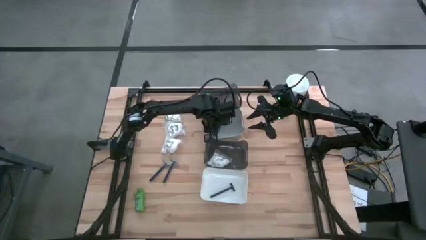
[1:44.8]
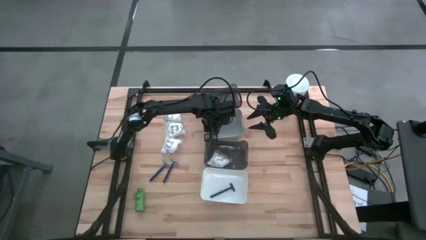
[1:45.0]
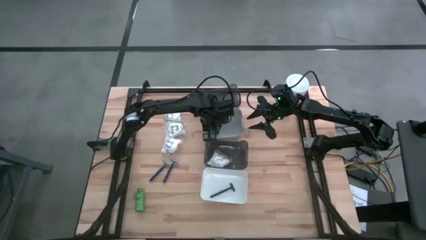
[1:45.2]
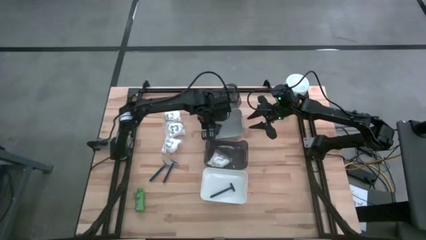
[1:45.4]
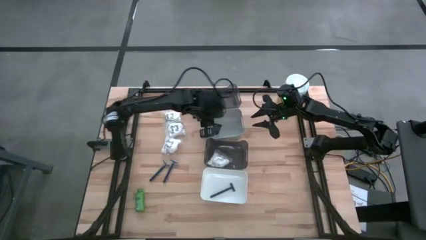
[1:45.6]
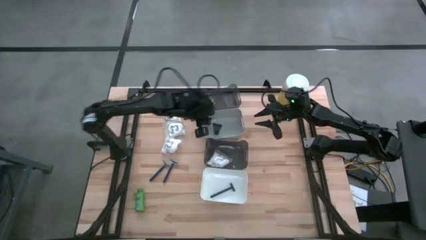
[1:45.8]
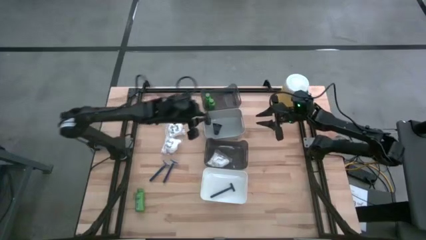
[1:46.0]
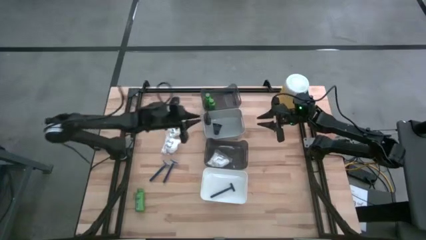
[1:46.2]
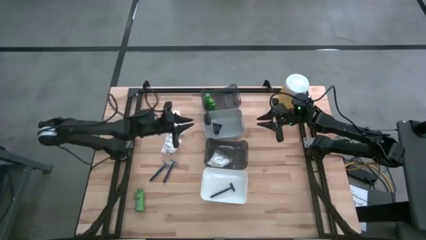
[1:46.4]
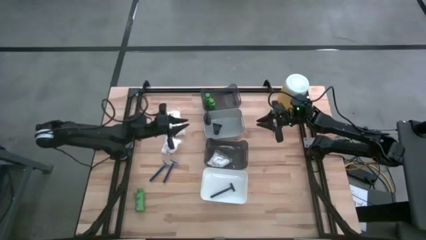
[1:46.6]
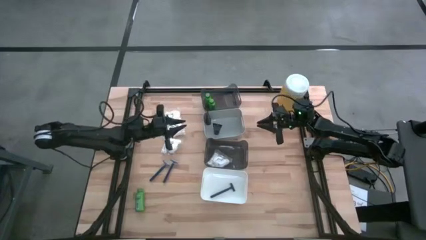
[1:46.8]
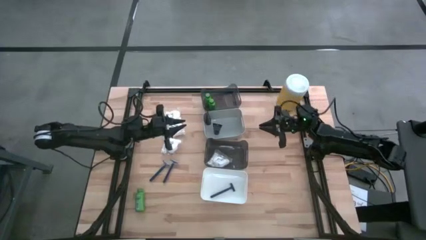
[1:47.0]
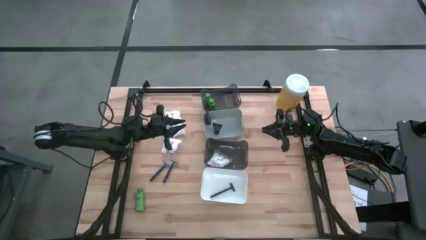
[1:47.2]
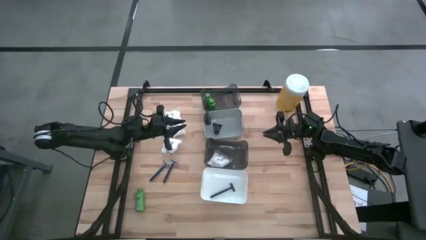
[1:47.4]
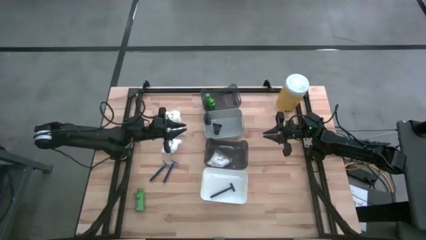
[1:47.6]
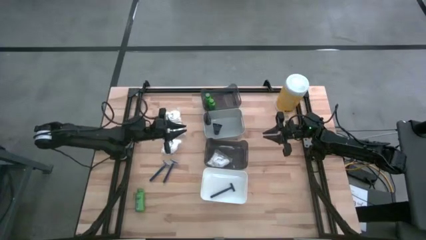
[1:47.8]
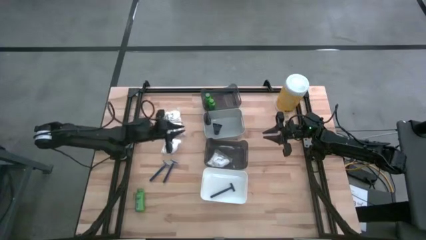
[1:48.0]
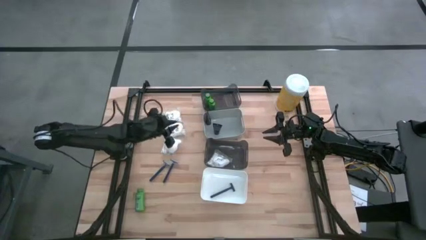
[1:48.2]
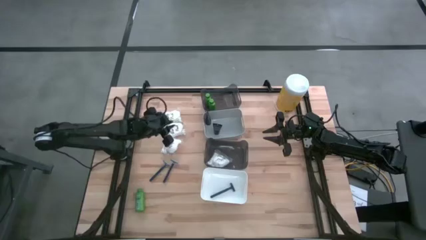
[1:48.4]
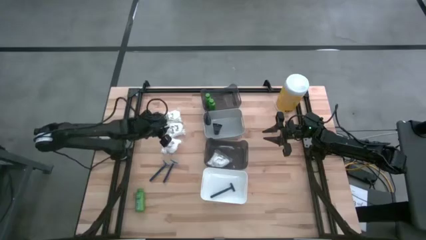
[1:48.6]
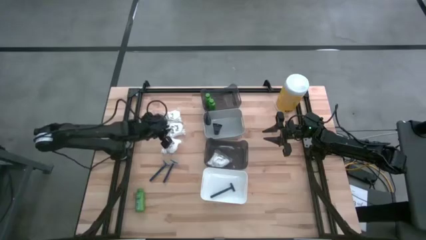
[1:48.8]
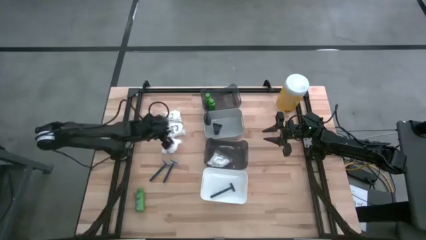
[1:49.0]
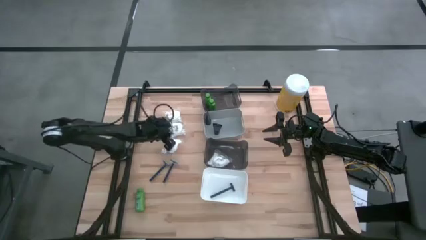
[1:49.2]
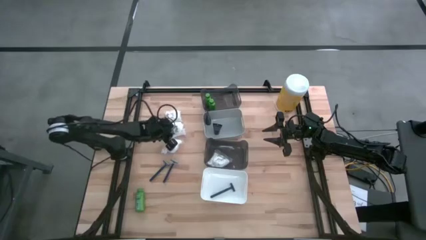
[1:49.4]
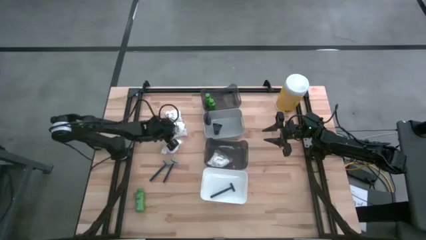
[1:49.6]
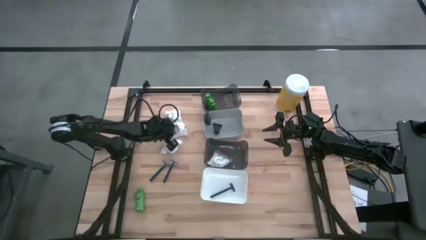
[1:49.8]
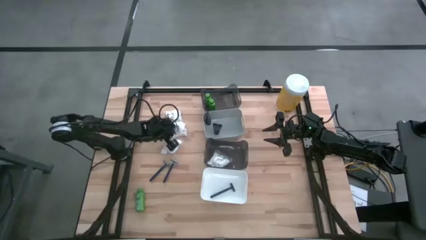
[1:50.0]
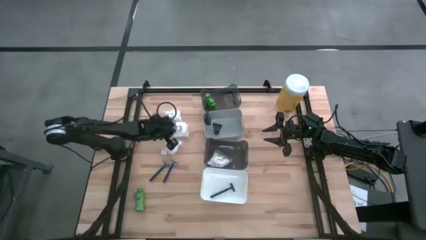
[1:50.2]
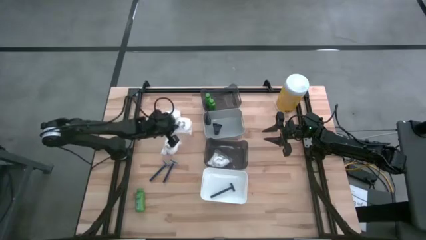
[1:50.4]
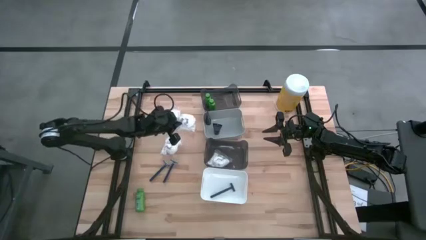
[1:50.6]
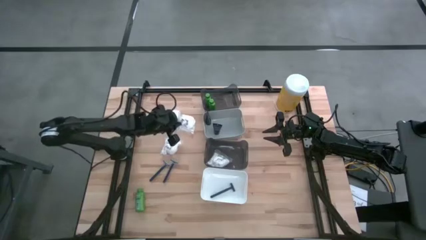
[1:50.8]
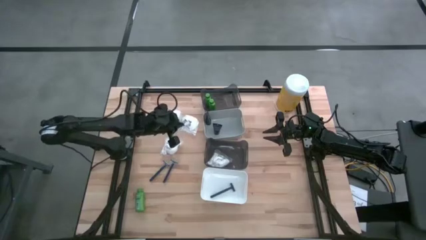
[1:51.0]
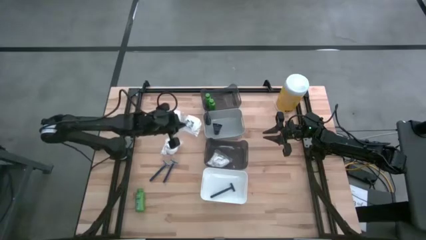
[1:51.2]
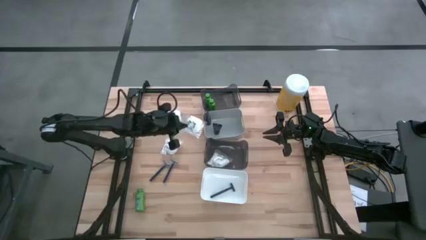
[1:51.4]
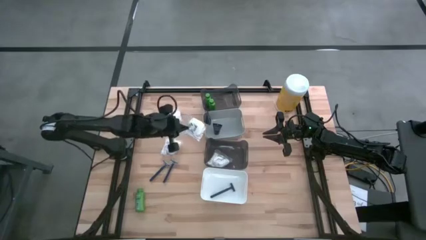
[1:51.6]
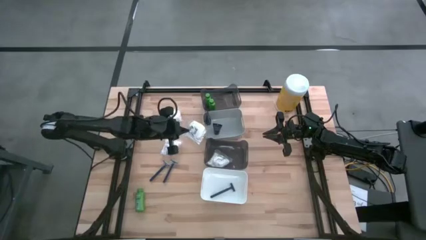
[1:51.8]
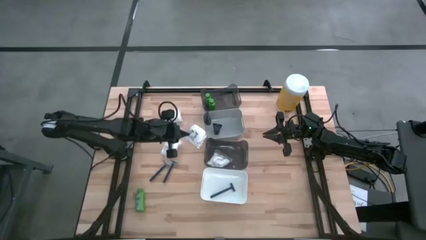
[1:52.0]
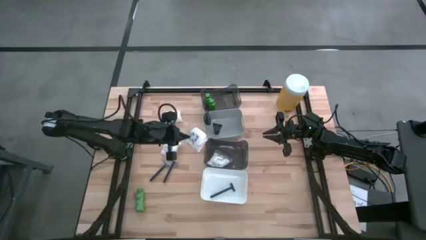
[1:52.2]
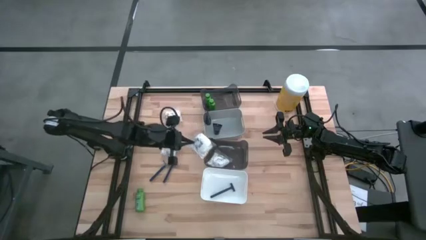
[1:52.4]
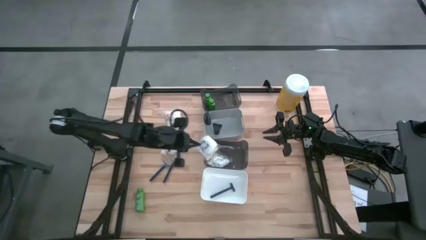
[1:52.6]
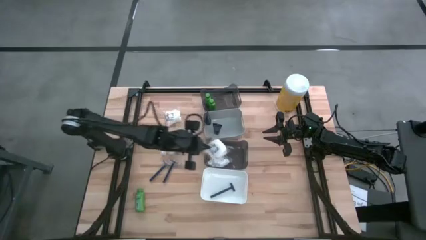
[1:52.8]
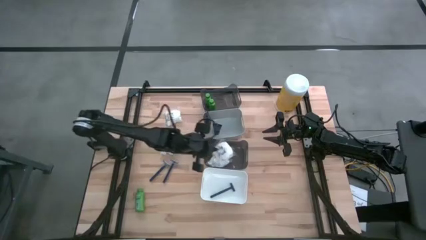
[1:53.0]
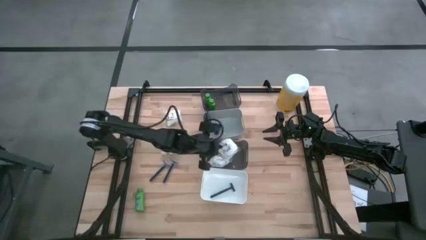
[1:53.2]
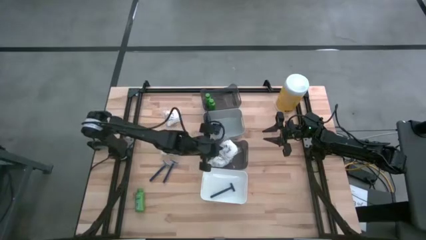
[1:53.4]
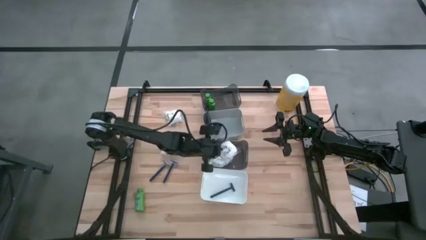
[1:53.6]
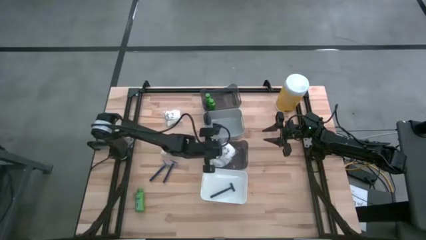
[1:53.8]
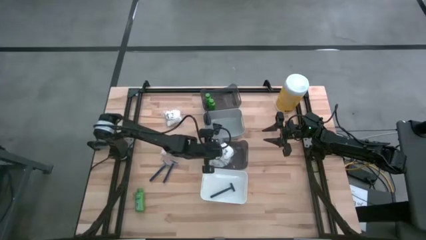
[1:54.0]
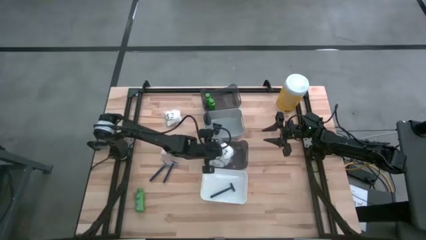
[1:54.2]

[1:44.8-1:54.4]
Task: Pick & Place Travel size toiletries
Put the middle white cotton pack into the bottom black bin

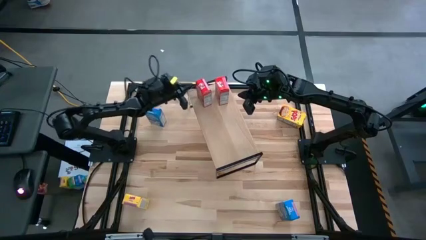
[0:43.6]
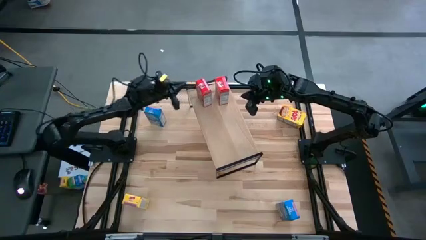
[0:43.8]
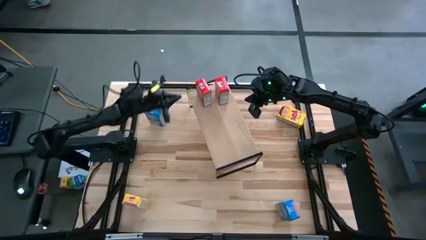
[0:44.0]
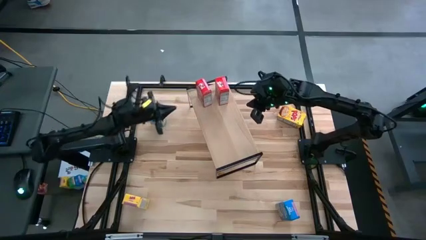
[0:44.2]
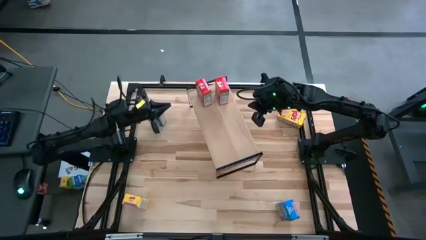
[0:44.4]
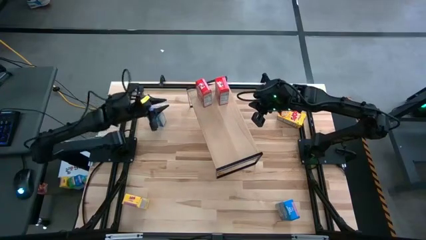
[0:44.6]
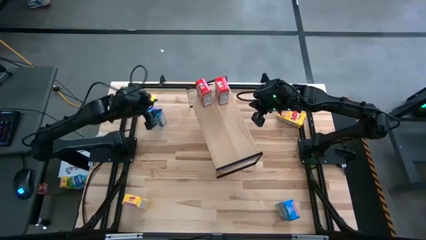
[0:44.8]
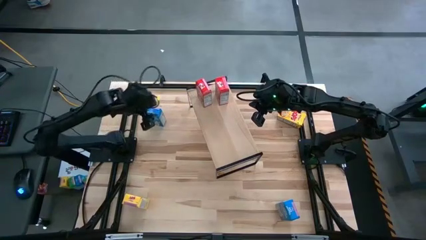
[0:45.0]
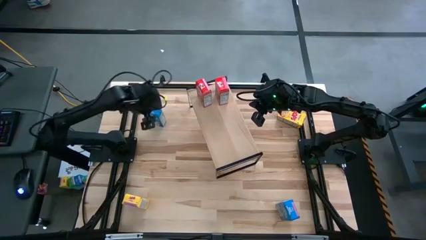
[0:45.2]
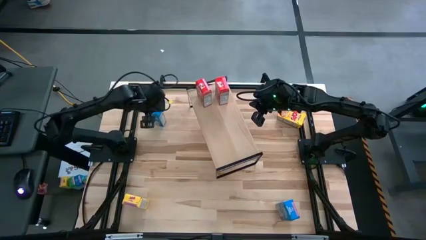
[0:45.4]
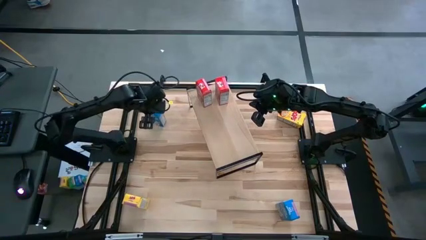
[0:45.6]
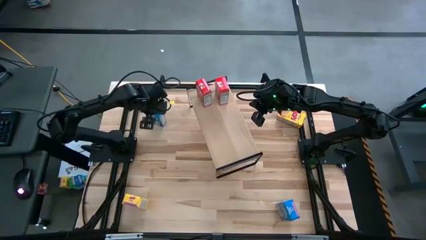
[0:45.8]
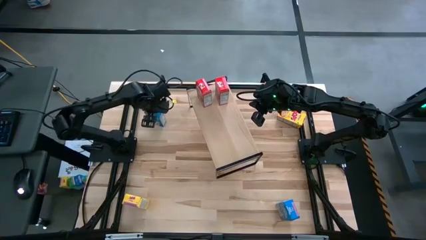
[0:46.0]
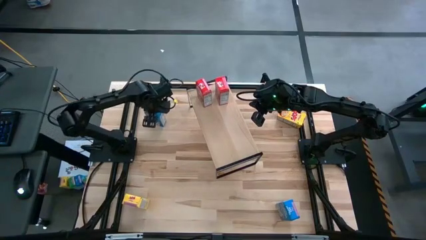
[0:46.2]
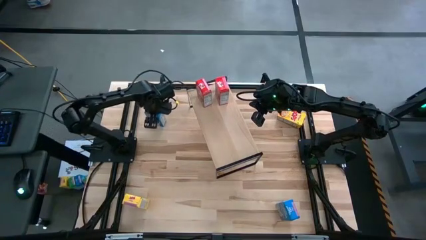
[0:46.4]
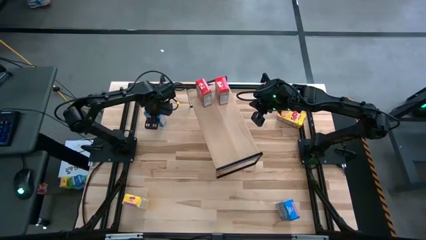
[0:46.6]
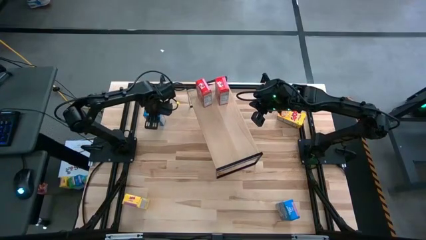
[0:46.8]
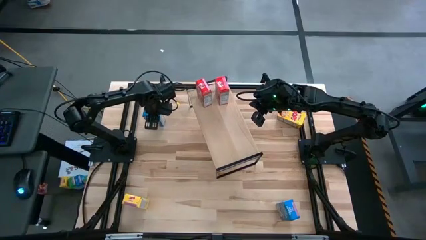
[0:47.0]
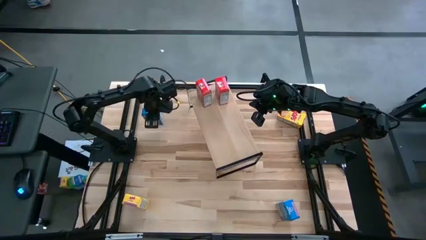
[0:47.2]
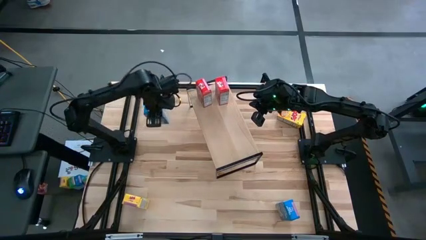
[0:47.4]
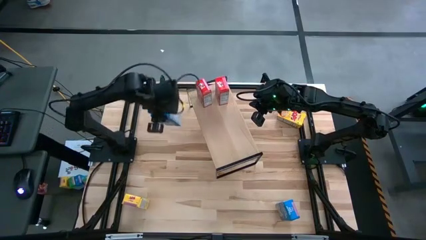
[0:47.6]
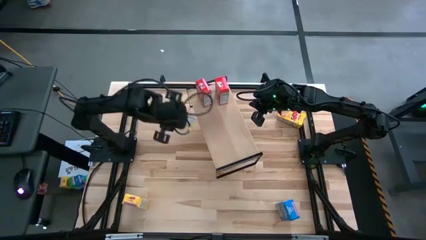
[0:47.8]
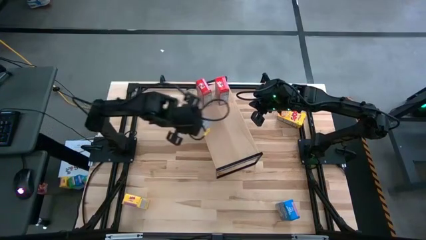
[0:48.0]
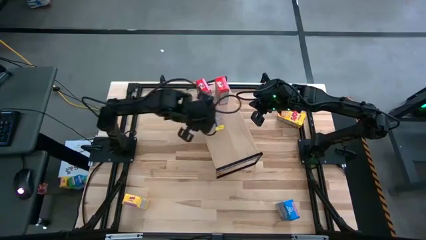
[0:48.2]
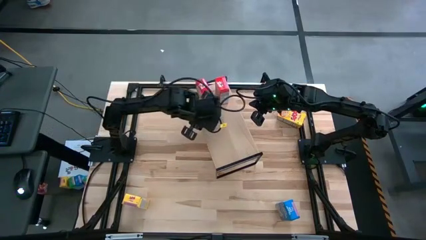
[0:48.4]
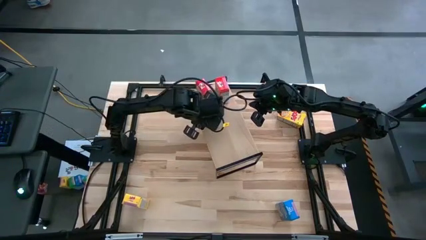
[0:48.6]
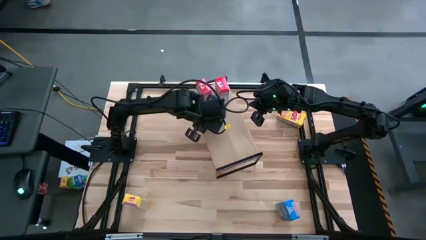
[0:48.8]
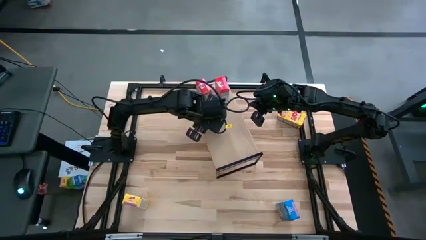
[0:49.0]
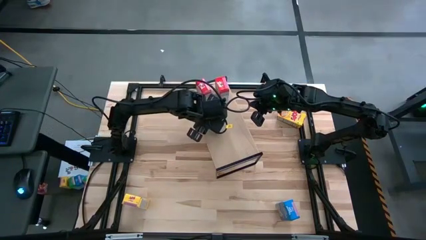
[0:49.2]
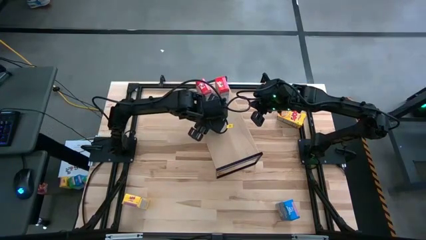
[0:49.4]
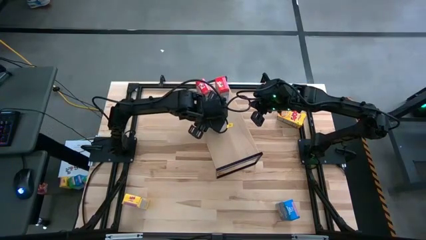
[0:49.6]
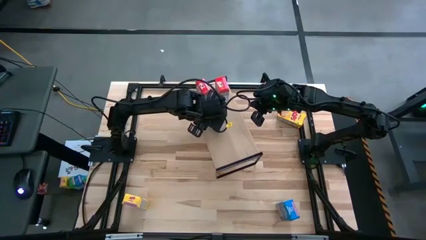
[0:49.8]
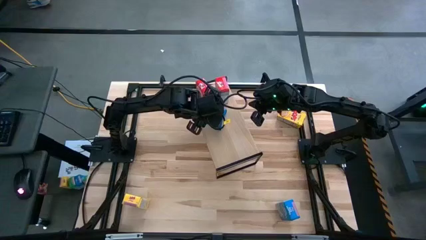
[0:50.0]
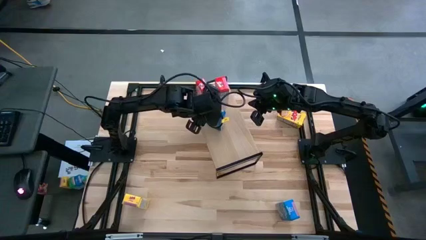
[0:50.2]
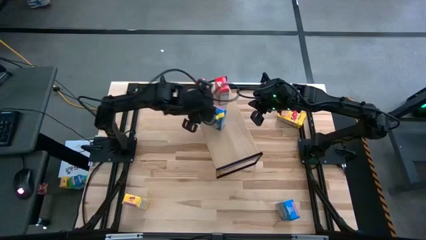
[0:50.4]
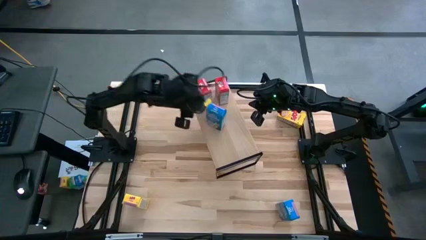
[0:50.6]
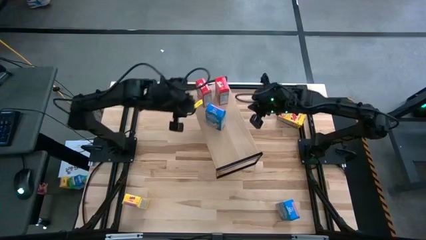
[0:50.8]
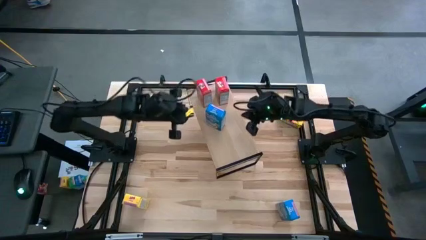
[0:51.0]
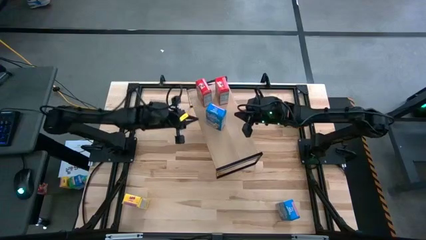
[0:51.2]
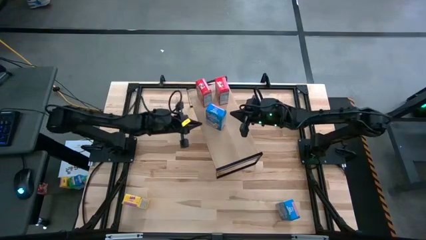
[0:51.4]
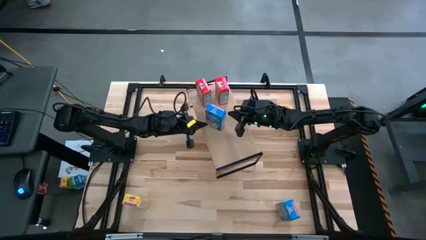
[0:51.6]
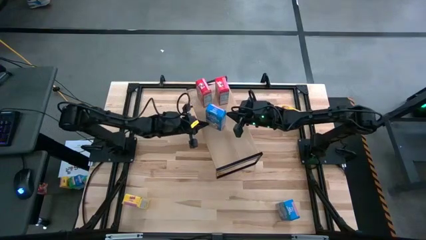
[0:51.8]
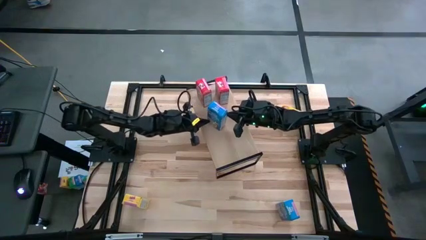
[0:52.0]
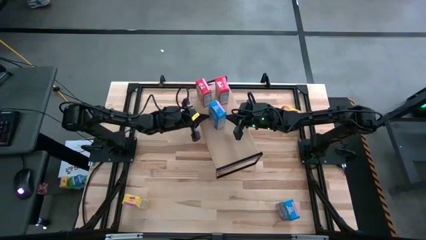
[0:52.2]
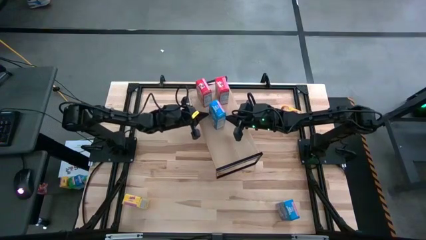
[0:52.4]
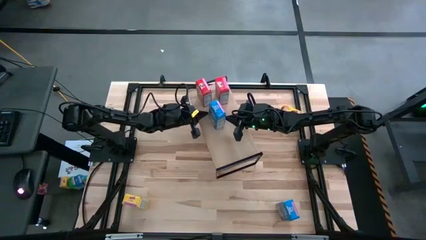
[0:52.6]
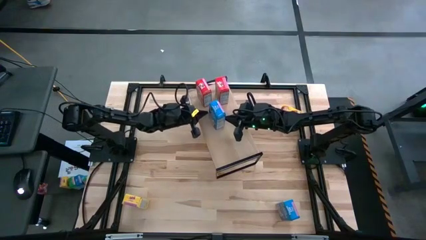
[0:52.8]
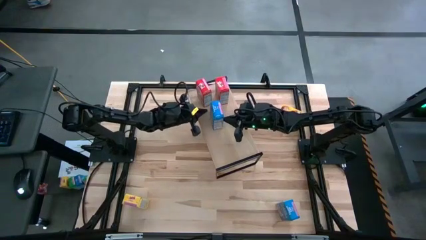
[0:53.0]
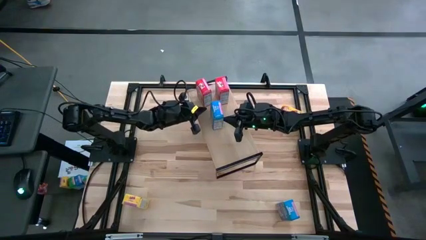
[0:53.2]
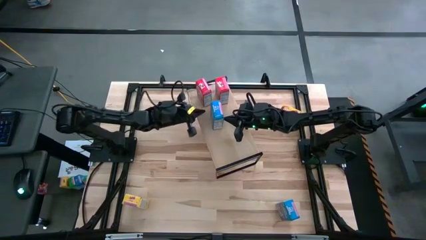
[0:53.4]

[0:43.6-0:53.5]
Task: Stack cereal on shelf
Put the left blue cereal box on the shelf
